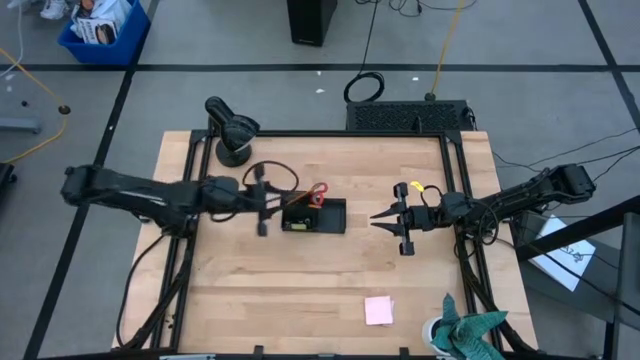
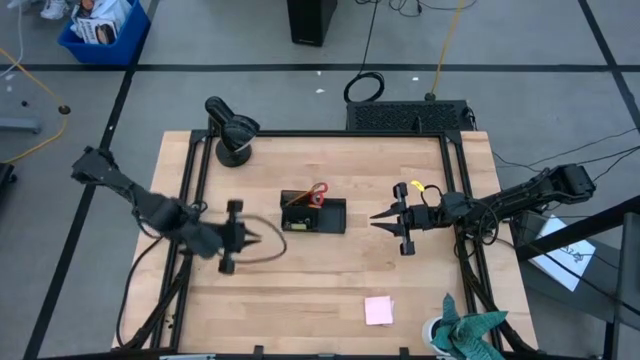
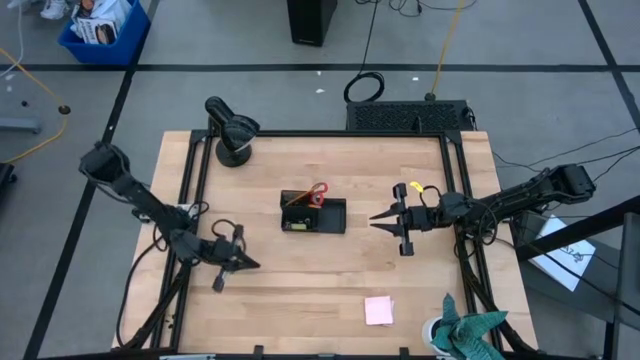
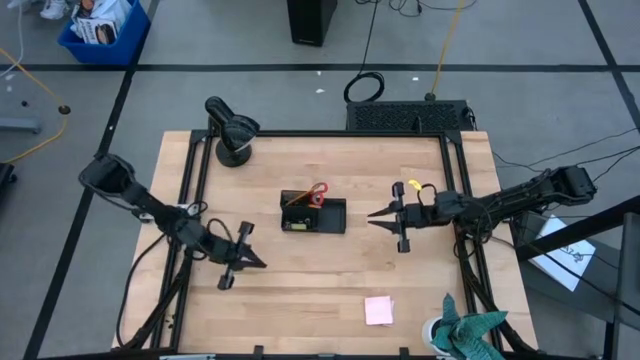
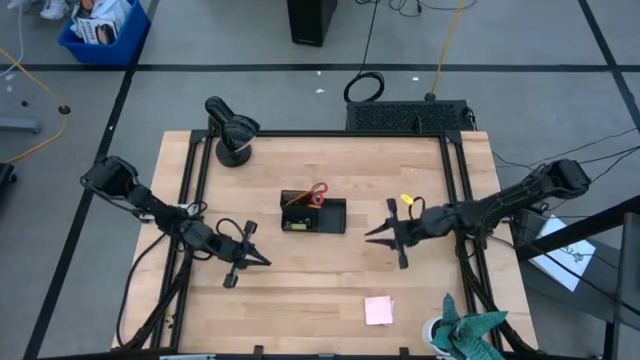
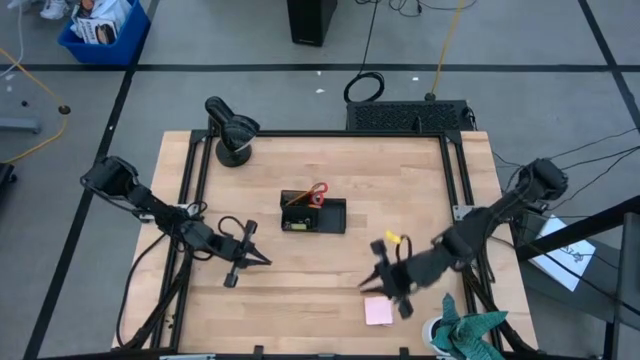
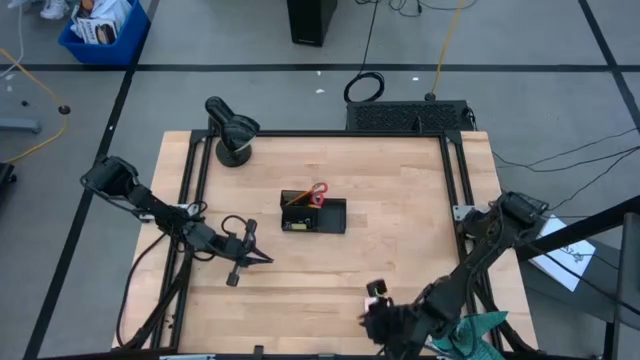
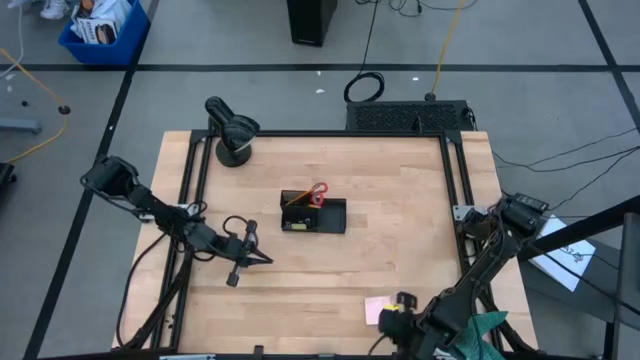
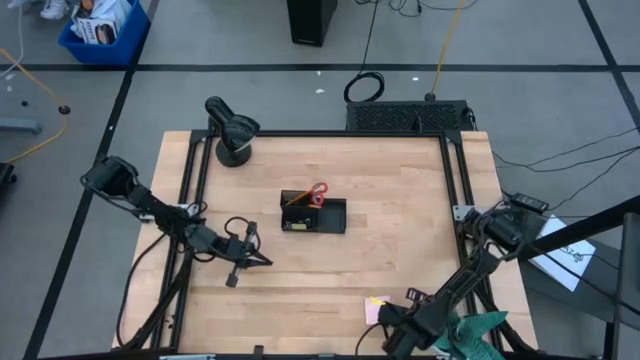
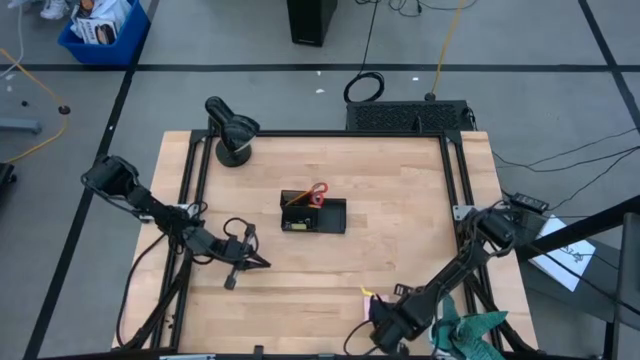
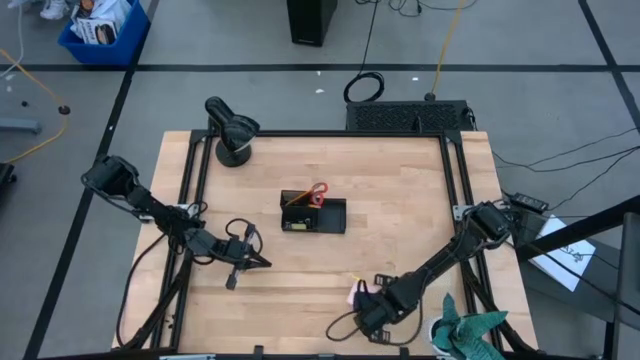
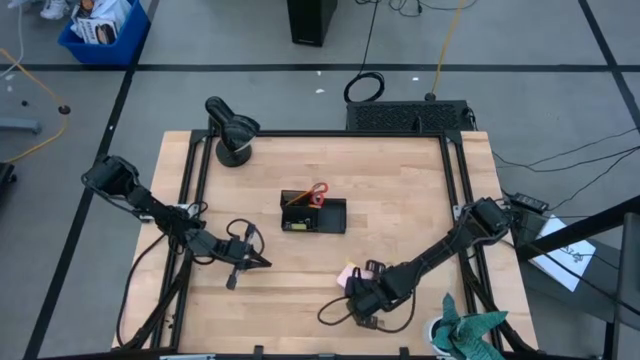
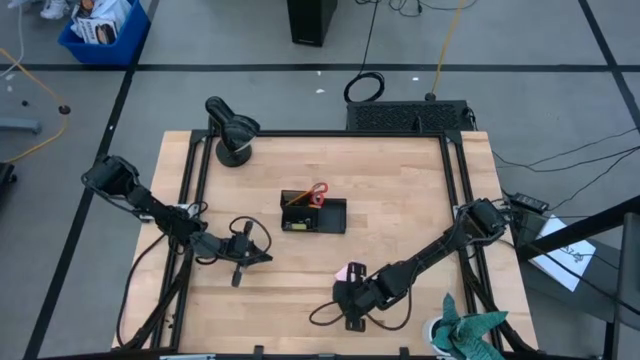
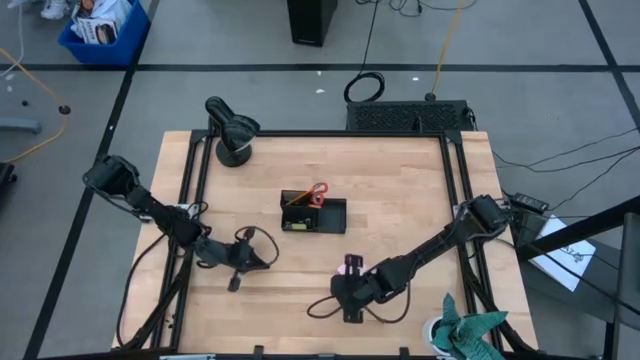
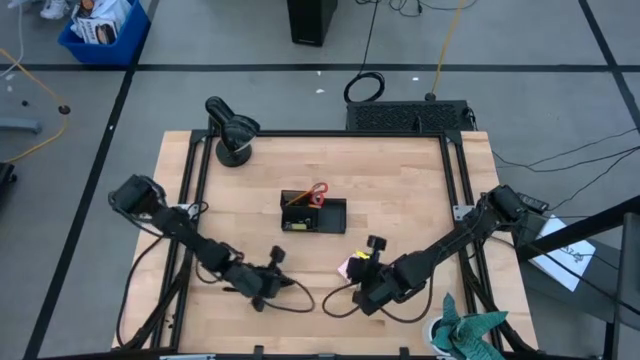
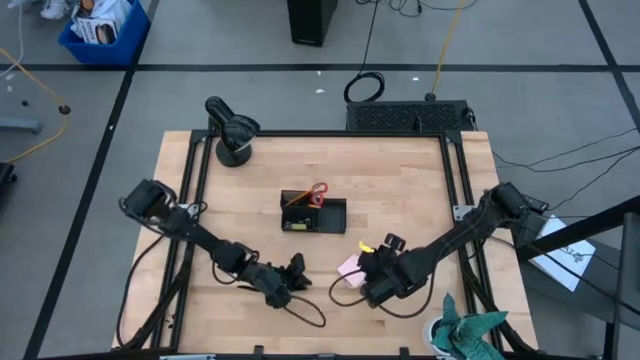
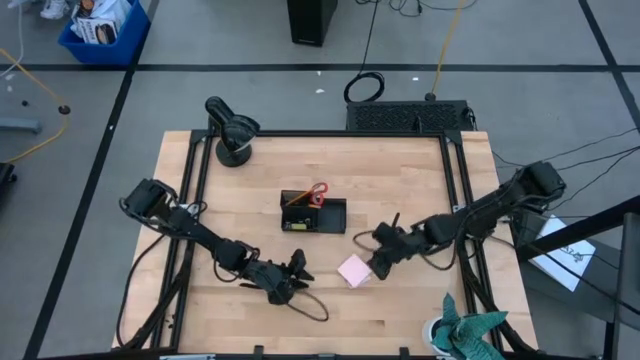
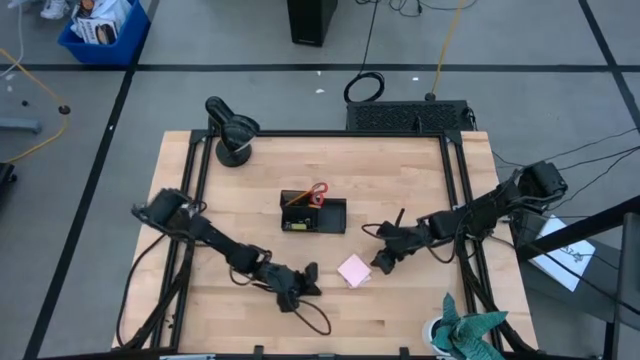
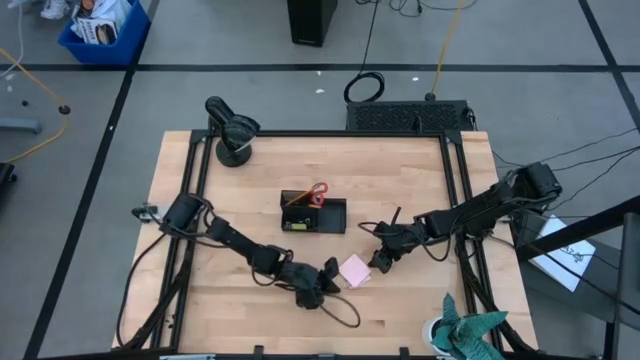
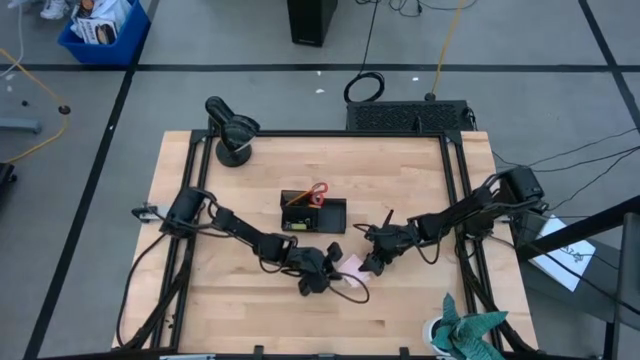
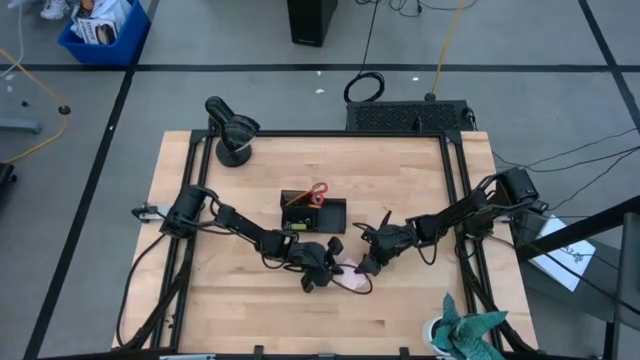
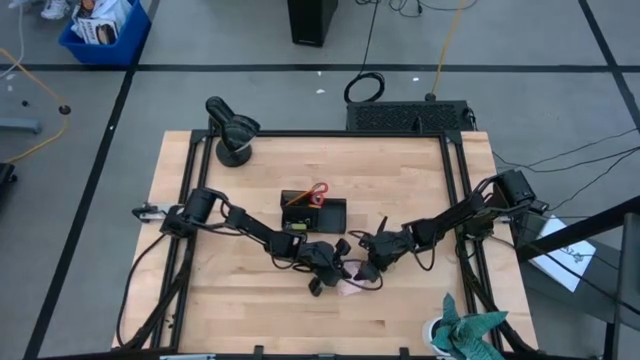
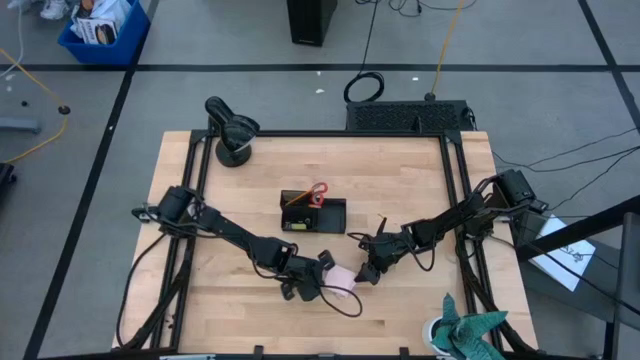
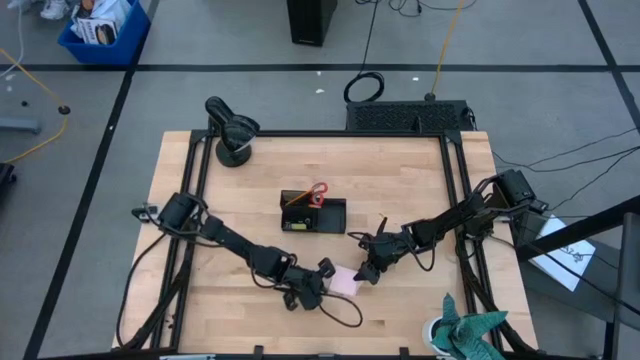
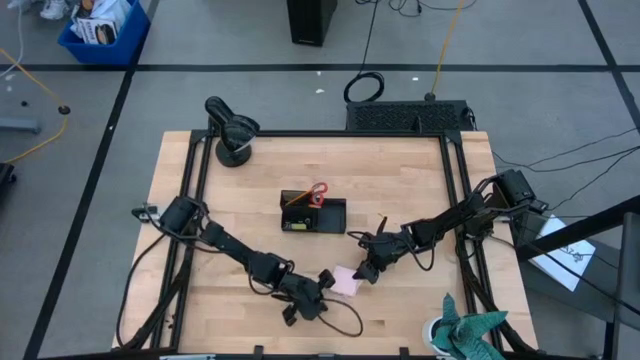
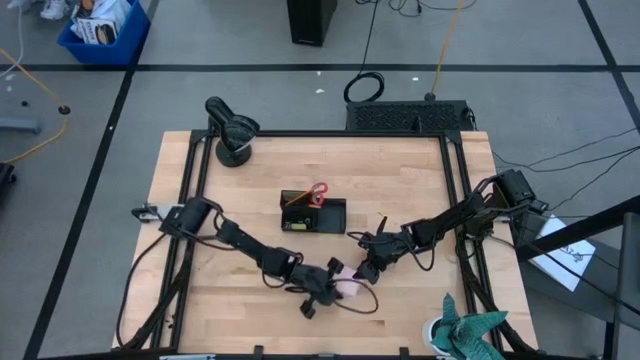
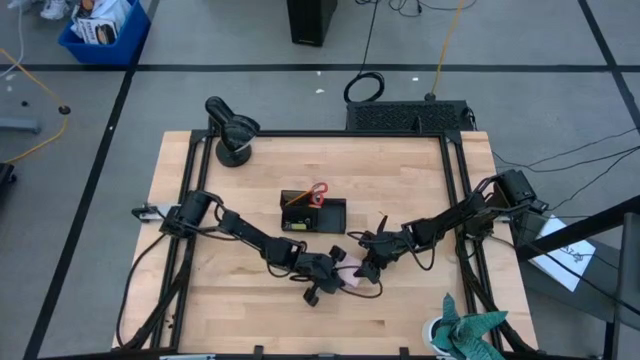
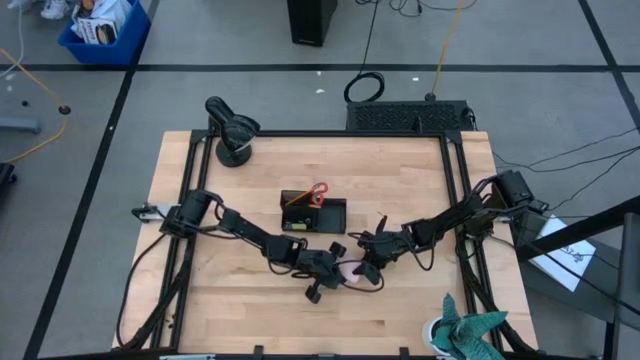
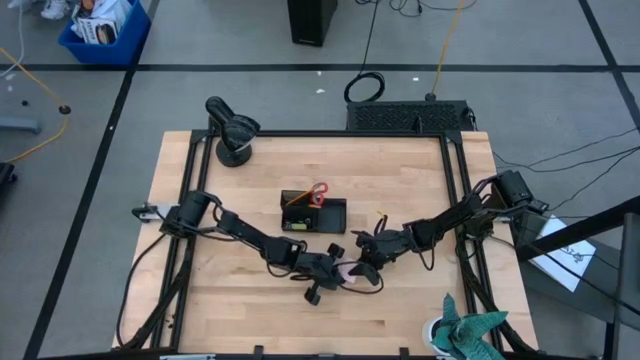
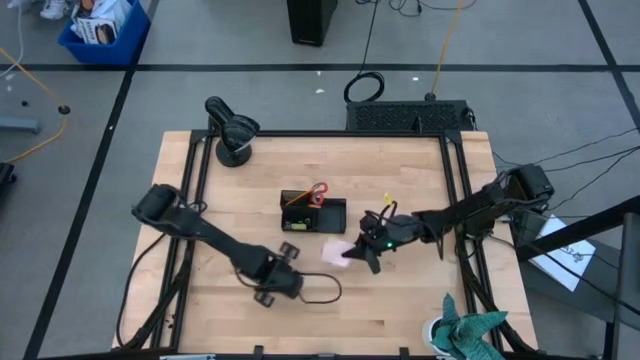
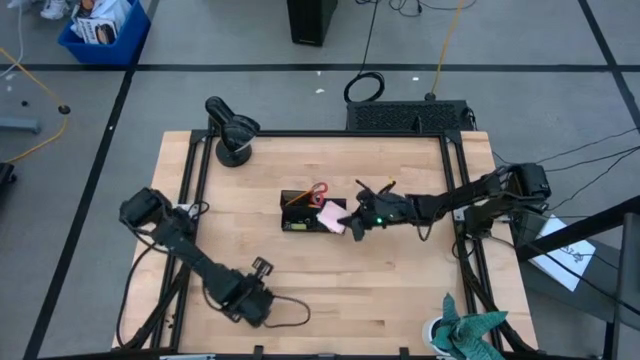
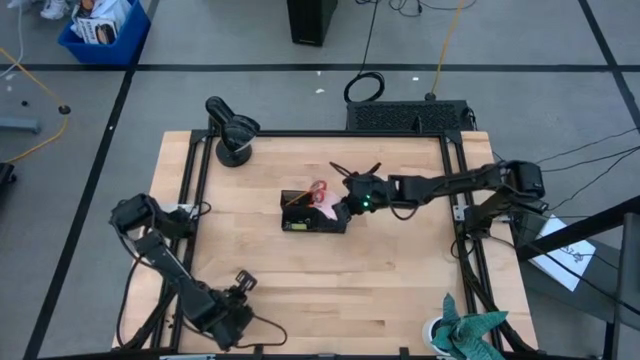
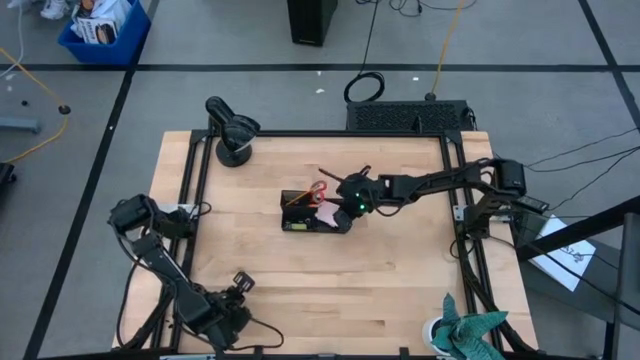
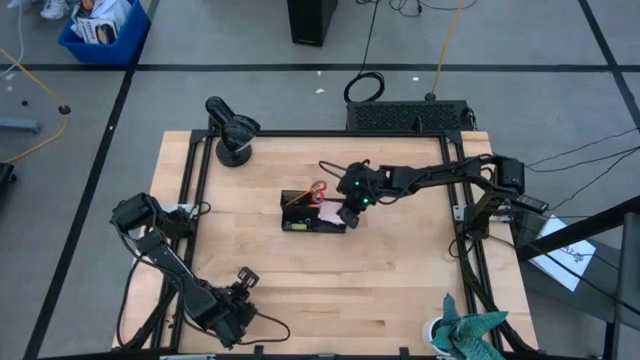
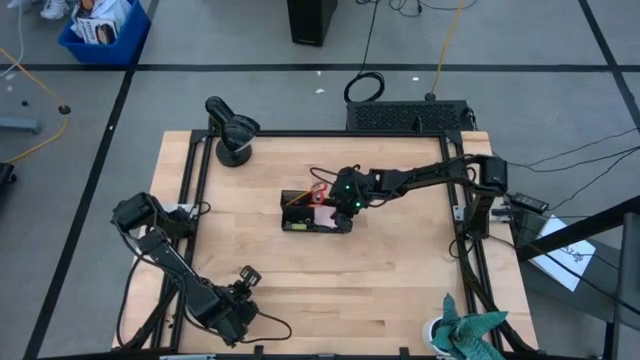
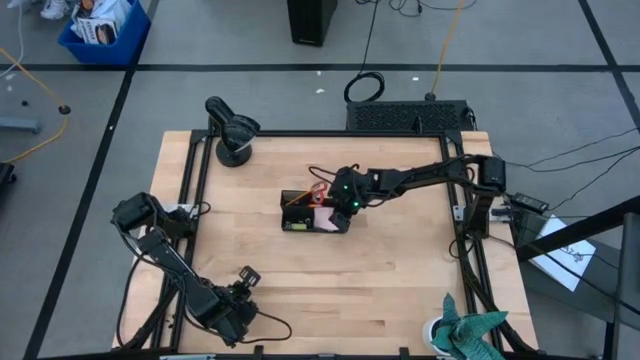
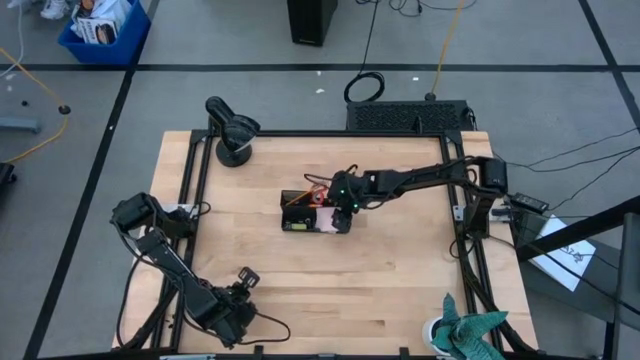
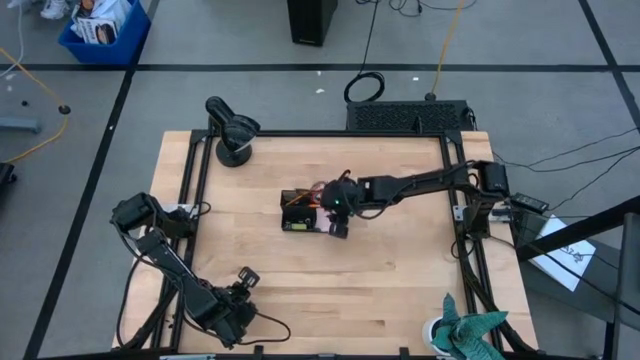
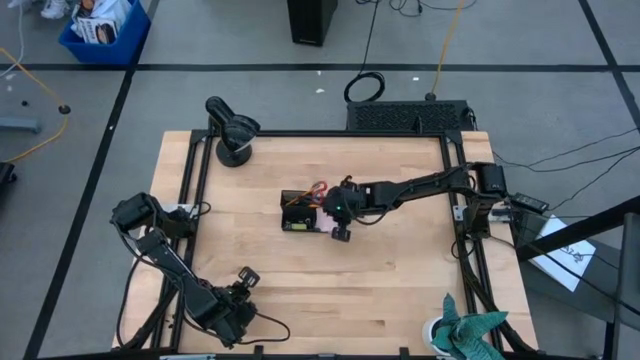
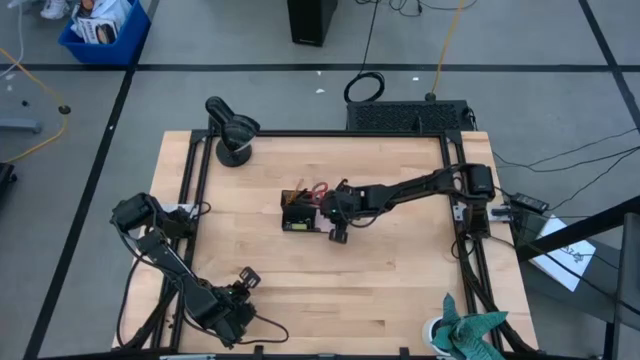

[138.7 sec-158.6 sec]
Task: Pick and place office supplies into organizer
Put the pink sticky note into the black desk organizer
